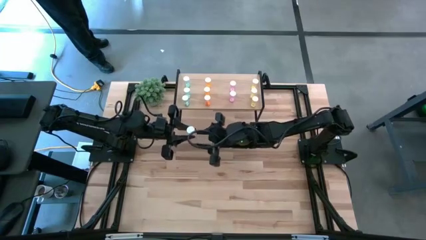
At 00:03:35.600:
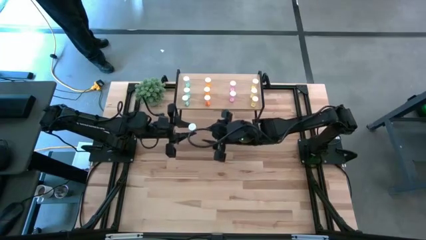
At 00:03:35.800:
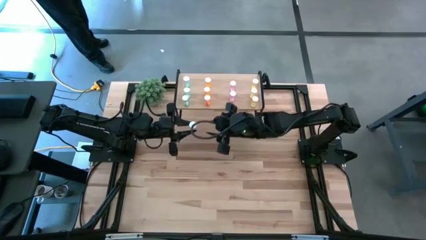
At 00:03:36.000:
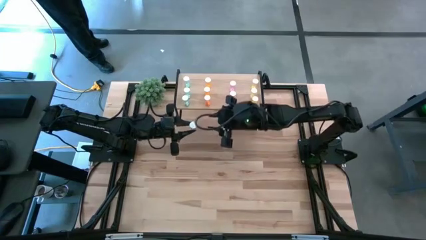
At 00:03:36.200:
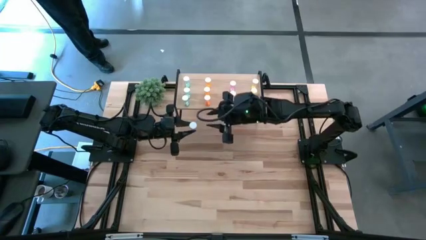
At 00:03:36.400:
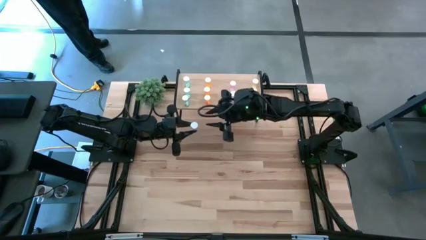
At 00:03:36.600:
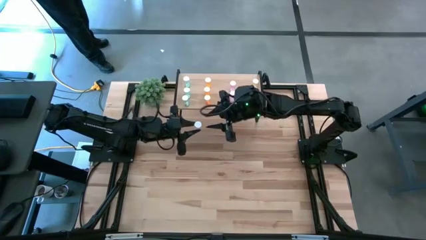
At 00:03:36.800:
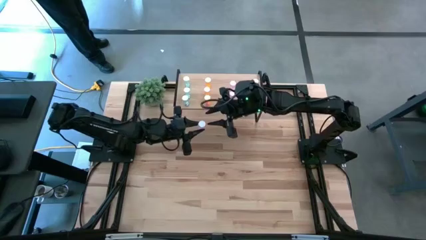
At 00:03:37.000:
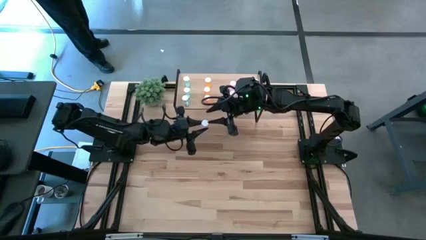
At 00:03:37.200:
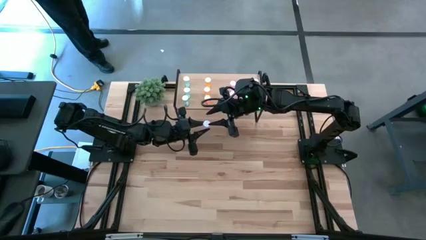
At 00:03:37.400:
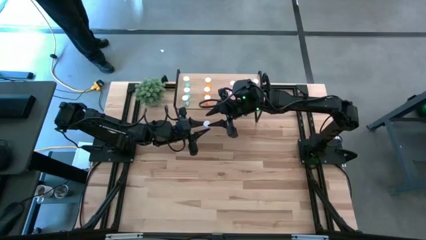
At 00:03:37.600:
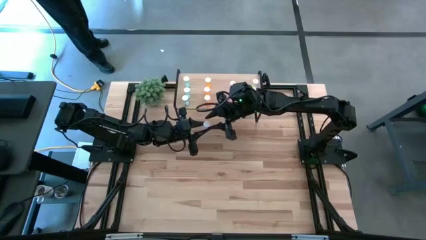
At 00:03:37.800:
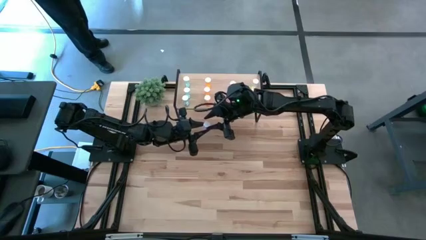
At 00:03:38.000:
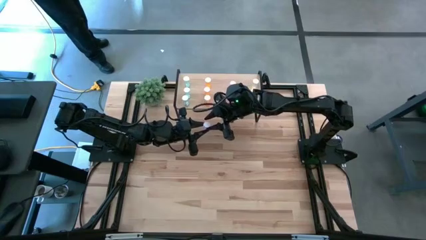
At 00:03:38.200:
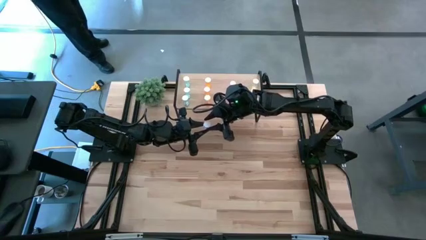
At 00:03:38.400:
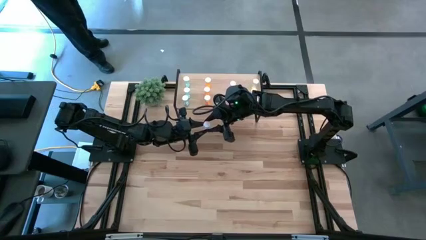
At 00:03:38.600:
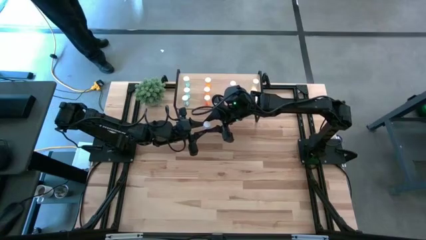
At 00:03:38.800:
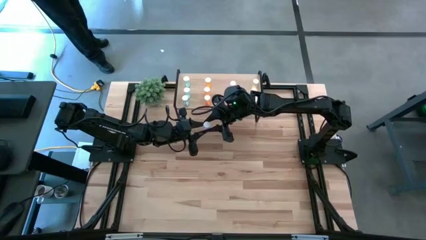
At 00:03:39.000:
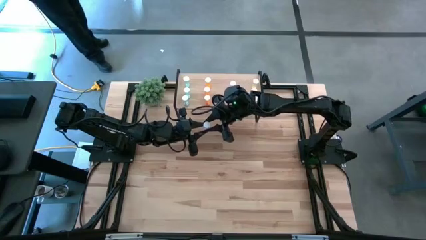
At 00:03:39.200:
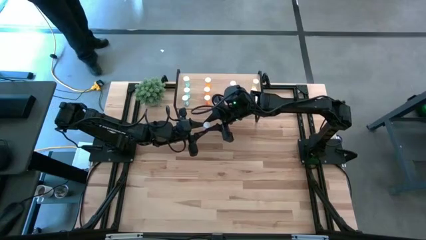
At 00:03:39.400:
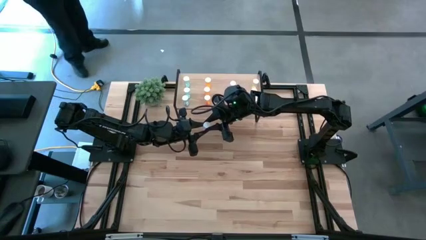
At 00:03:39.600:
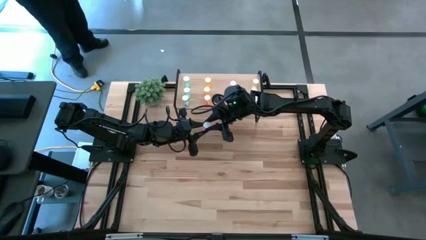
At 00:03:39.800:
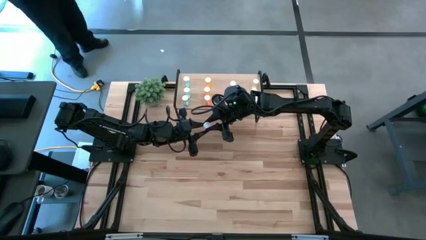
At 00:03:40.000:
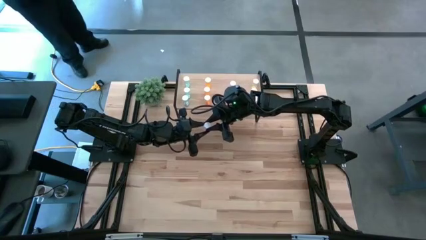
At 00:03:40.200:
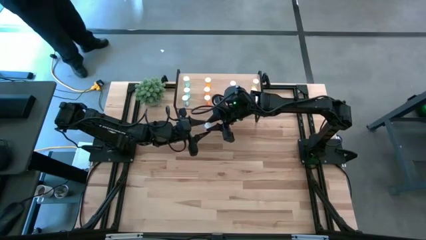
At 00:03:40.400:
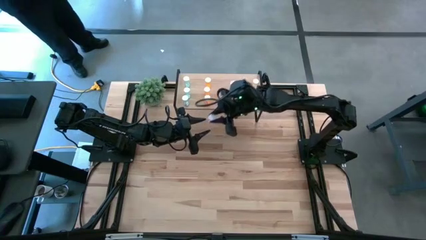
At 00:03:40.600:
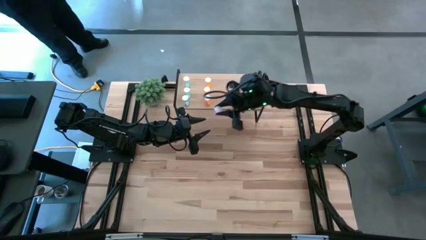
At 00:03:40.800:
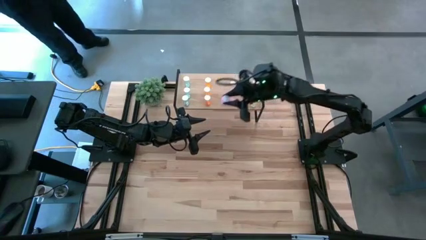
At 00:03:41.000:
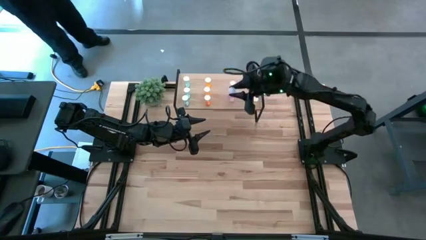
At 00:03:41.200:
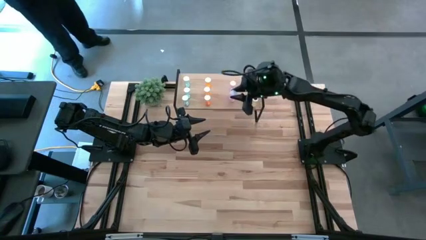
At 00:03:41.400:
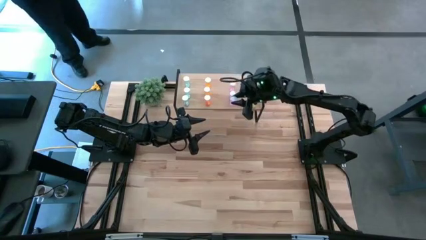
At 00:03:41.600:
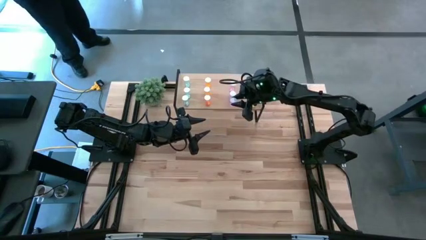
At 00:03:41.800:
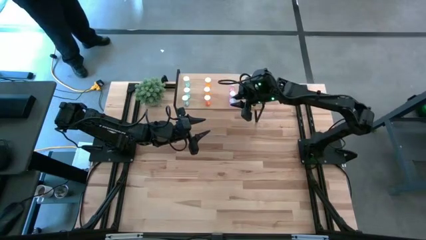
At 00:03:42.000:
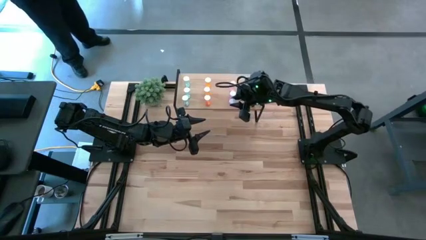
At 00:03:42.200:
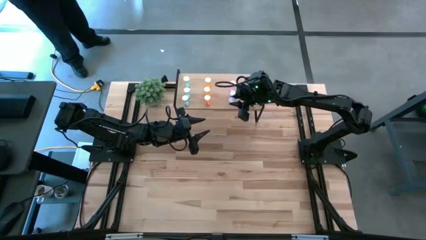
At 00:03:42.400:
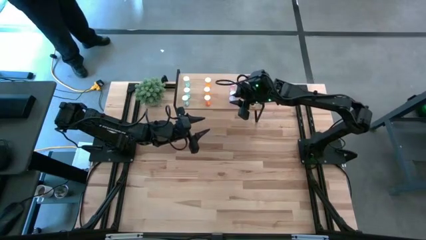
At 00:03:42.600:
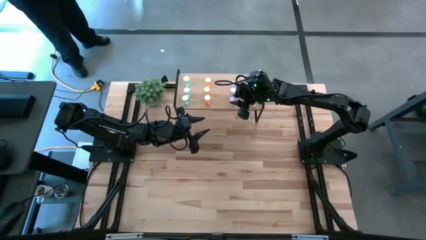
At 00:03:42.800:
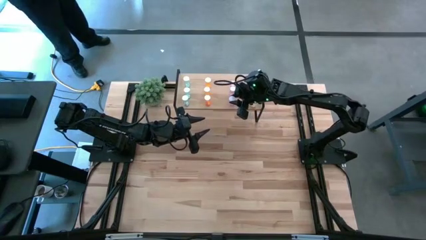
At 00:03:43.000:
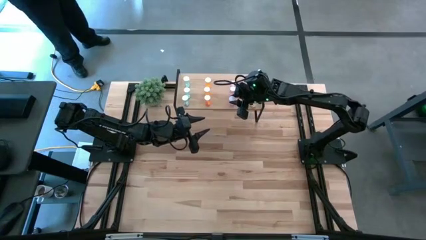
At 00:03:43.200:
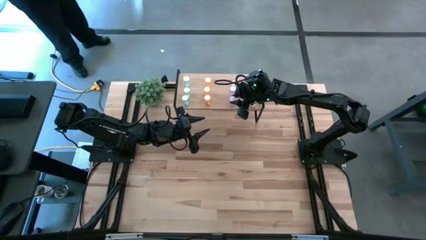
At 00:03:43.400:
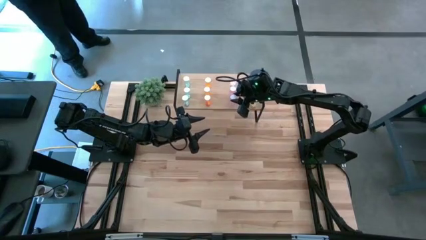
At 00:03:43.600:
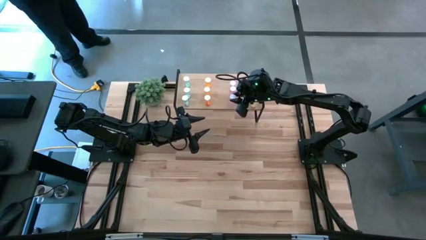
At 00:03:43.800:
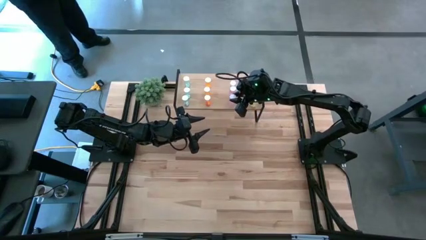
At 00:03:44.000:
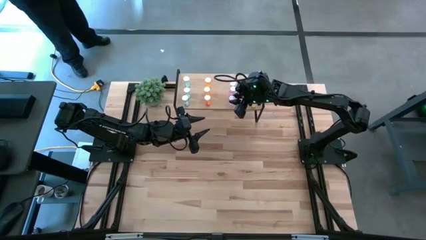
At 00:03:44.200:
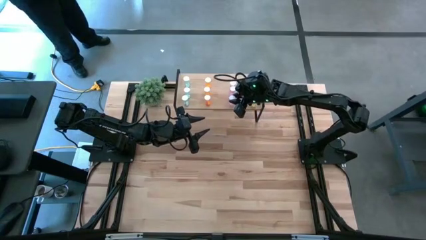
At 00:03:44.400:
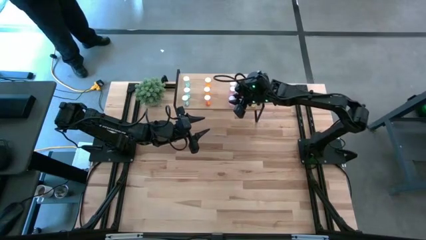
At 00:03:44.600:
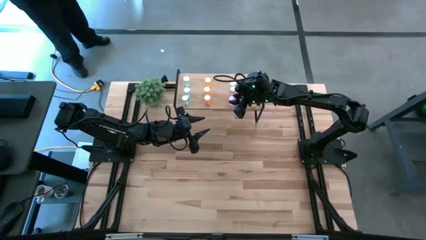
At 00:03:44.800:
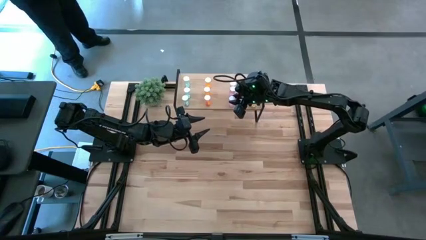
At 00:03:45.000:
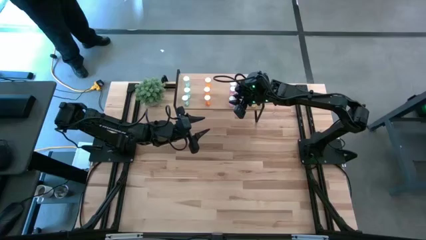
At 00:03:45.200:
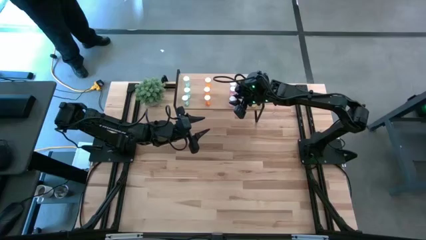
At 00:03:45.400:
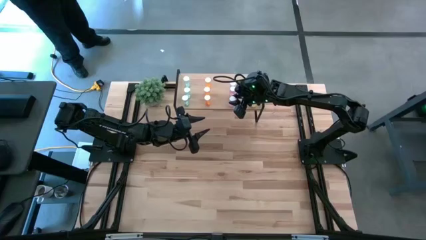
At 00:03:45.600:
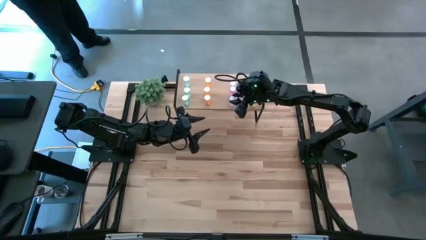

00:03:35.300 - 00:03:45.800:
Task: Pick and place medicine bottles onto shelf by color
Put the purple pill bottle on the shelf aligned with the purple pill bottle

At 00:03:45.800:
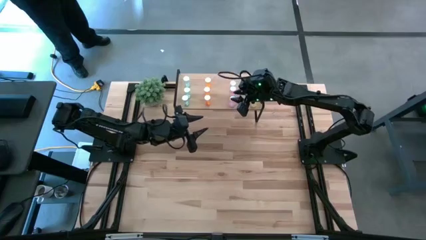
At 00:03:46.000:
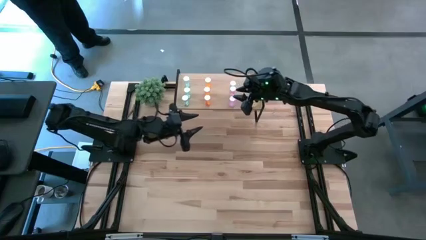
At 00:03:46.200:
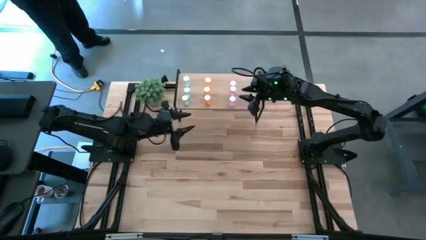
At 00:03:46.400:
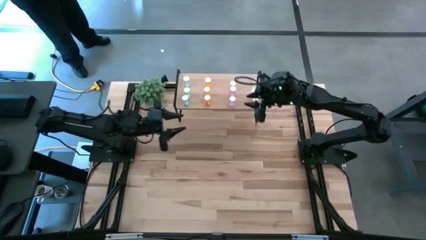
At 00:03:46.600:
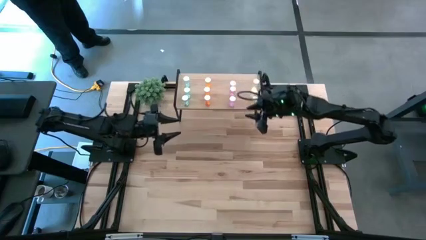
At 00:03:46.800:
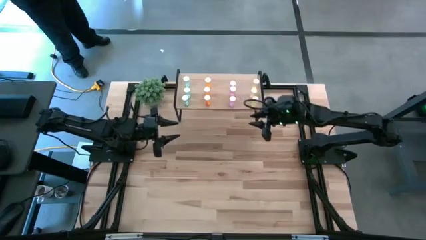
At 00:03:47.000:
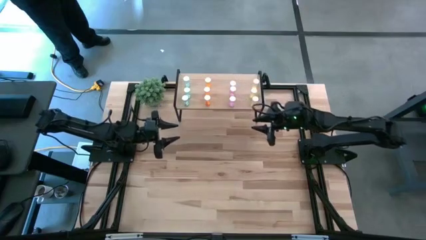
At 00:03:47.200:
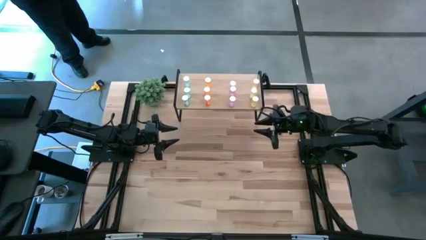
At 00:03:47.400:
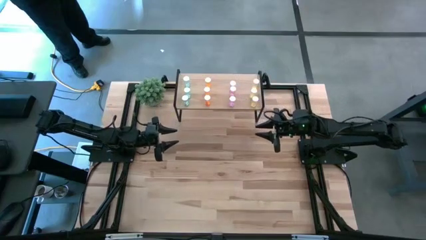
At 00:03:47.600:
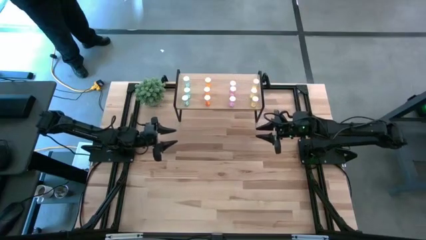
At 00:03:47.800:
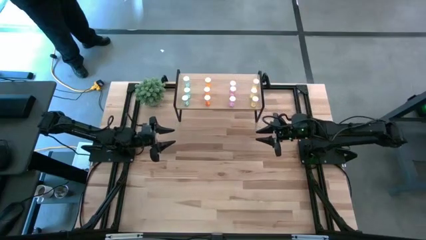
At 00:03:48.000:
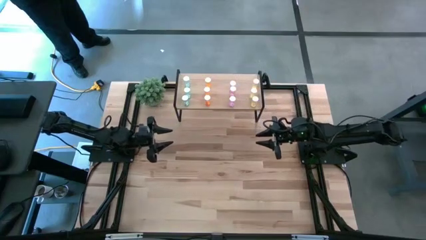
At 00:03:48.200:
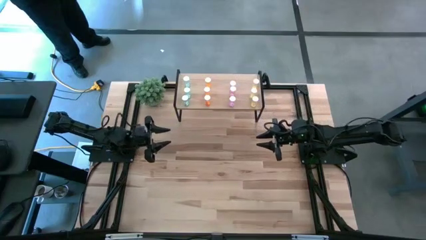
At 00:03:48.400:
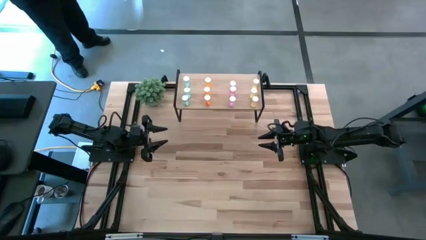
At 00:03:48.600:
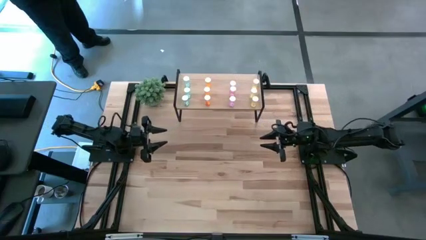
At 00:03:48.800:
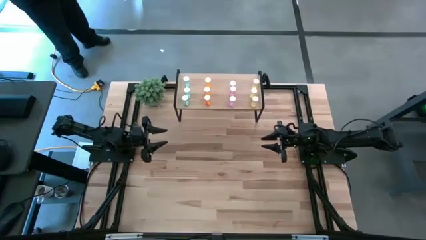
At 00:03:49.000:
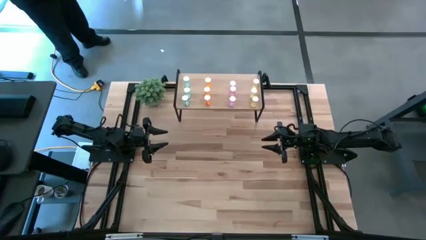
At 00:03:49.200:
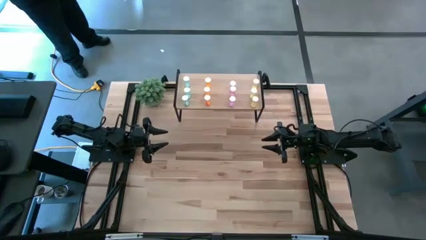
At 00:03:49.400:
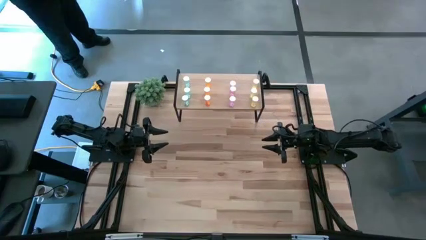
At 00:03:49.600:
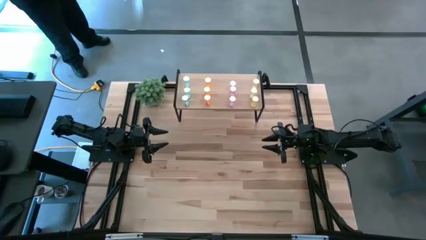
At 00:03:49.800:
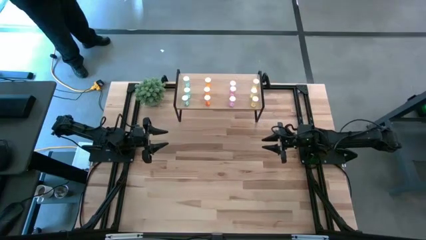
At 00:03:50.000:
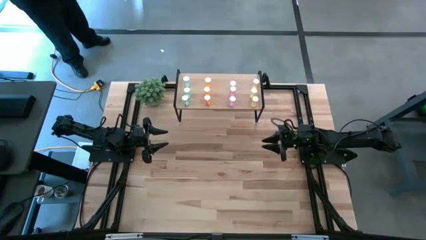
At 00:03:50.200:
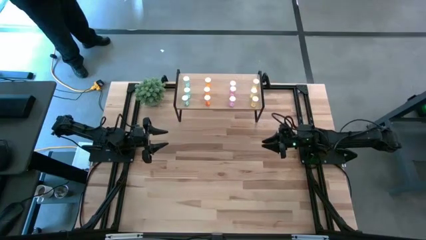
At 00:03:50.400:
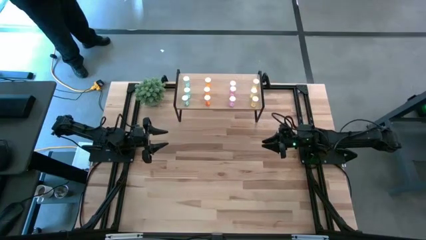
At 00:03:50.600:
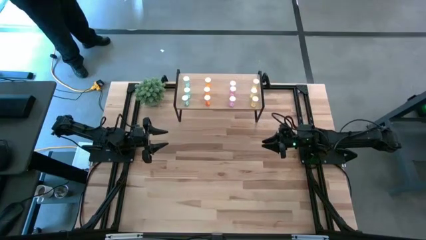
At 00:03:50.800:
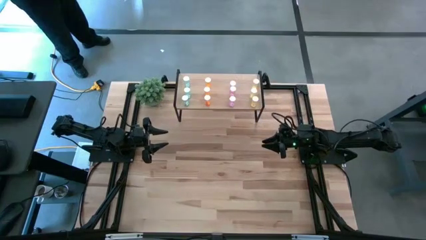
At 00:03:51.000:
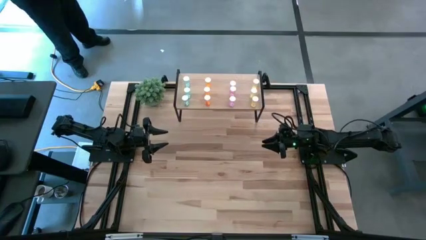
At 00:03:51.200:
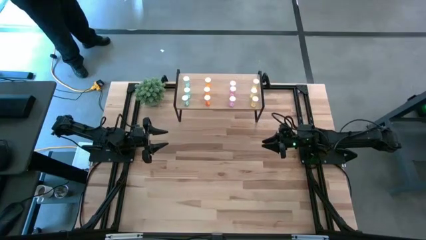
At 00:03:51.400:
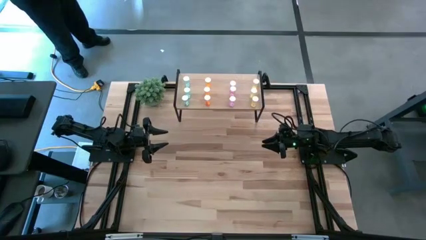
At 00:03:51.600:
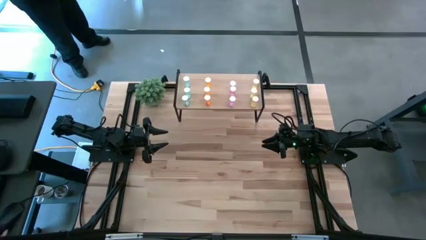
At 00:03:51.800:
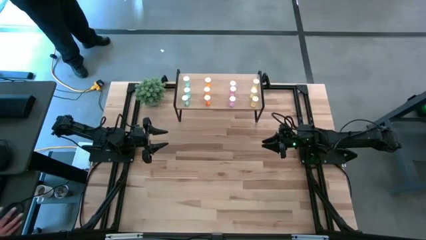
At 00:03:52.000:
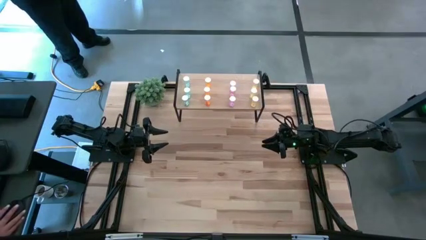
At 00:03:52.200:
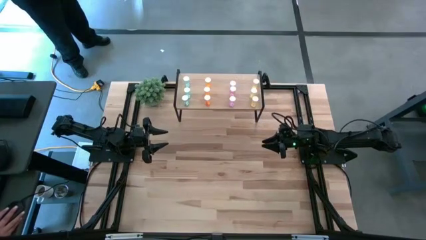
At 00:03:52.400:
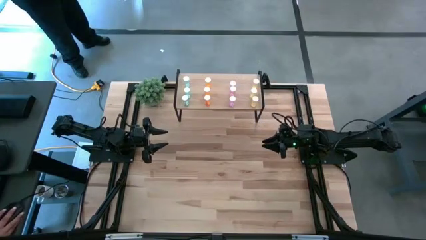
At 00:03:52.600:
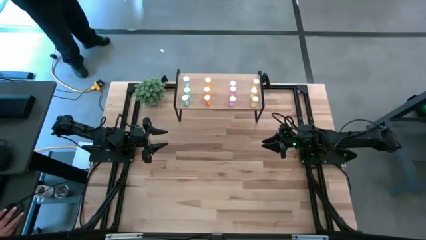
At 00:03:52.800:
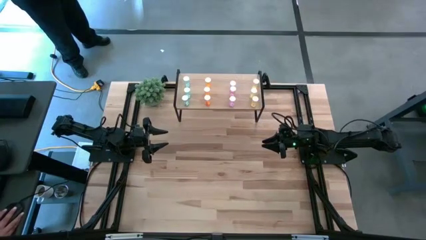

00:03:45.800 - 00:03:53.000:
Return to Home Position
